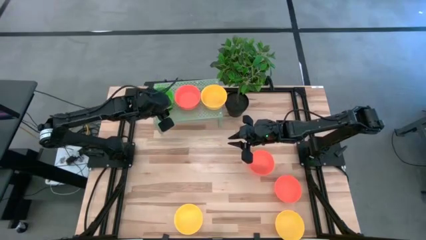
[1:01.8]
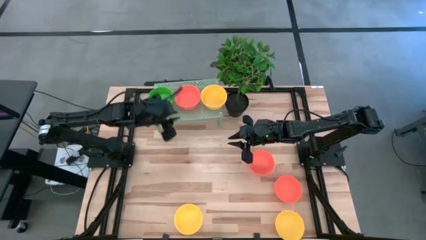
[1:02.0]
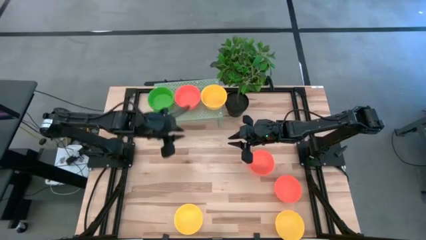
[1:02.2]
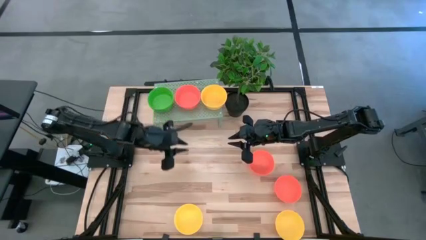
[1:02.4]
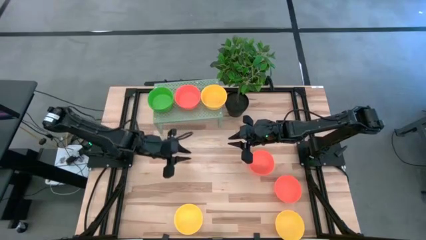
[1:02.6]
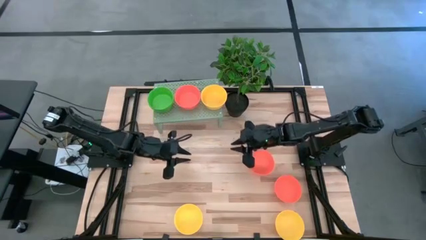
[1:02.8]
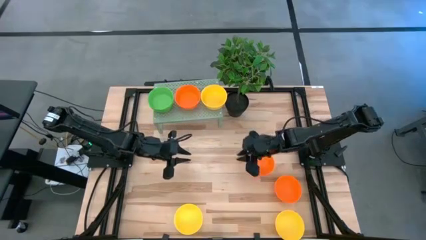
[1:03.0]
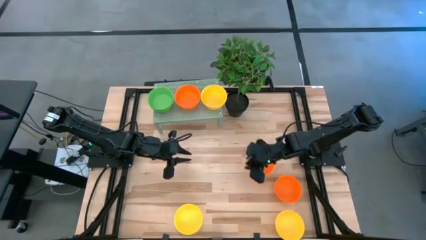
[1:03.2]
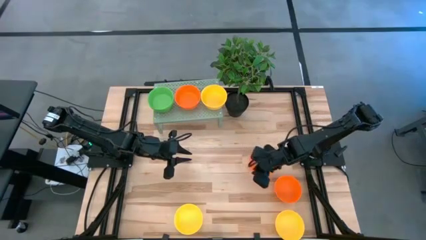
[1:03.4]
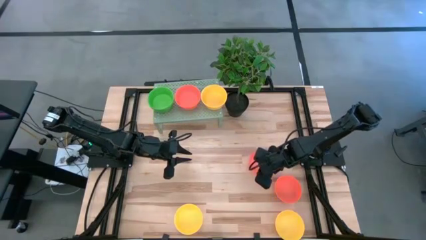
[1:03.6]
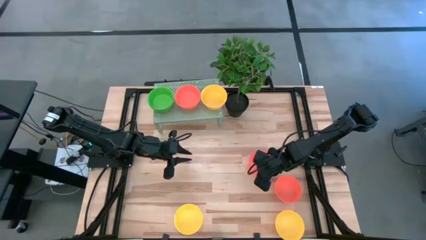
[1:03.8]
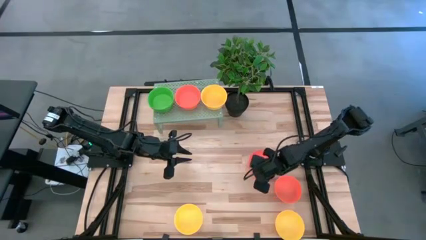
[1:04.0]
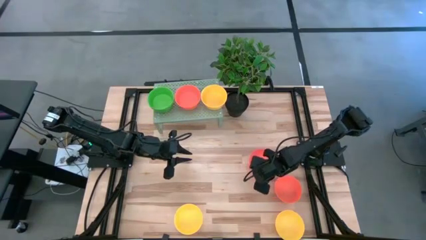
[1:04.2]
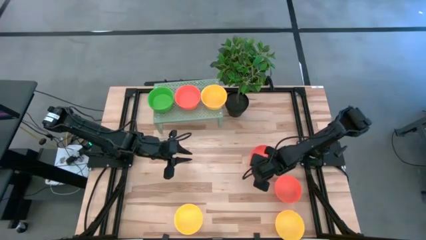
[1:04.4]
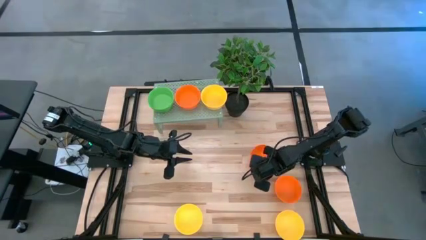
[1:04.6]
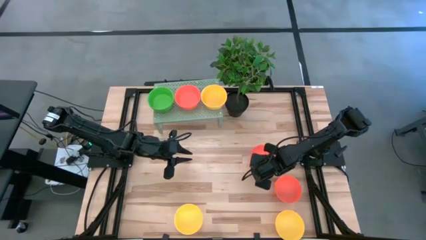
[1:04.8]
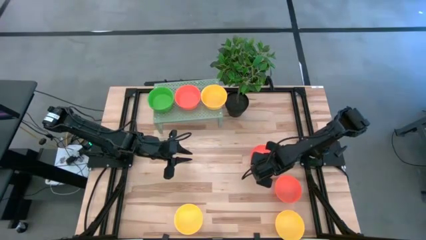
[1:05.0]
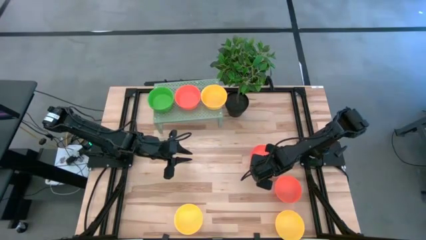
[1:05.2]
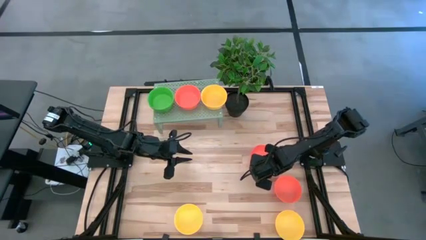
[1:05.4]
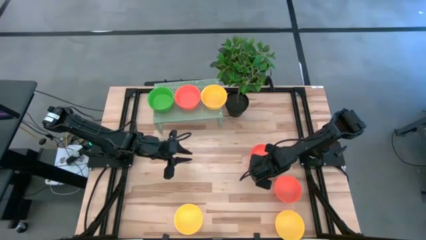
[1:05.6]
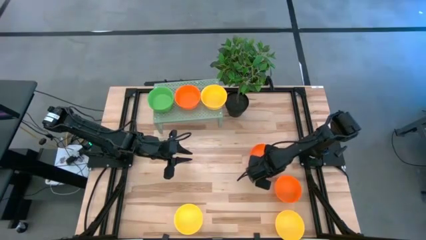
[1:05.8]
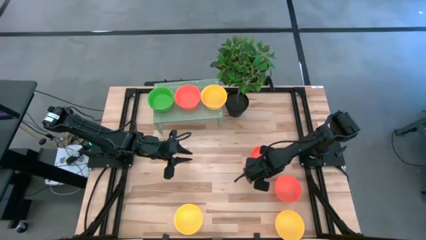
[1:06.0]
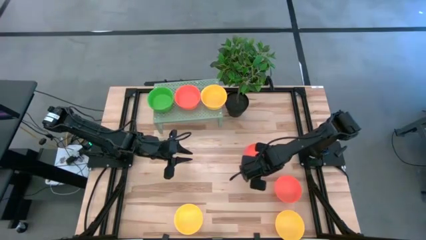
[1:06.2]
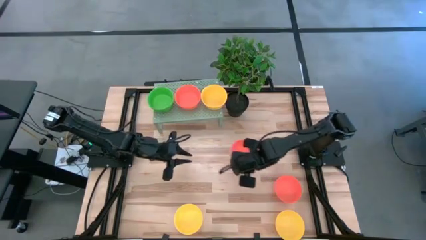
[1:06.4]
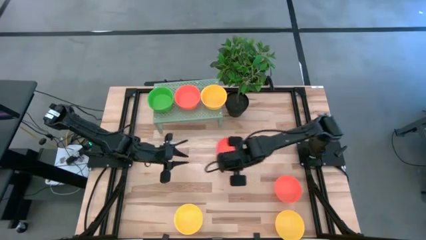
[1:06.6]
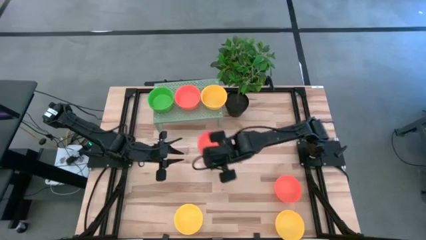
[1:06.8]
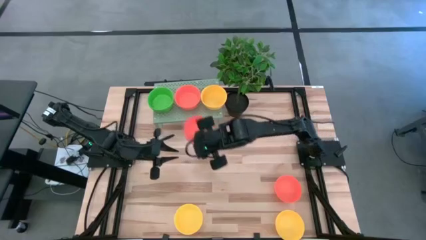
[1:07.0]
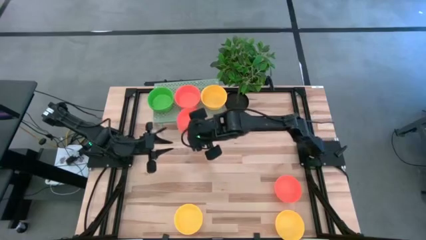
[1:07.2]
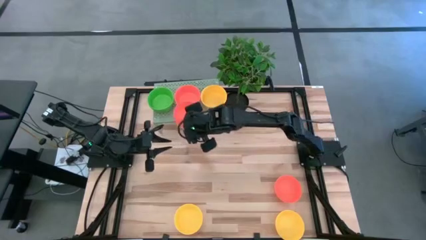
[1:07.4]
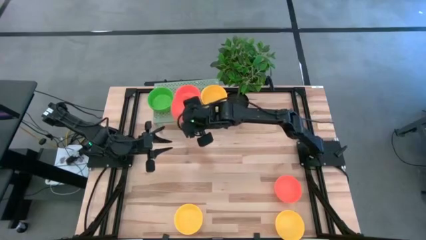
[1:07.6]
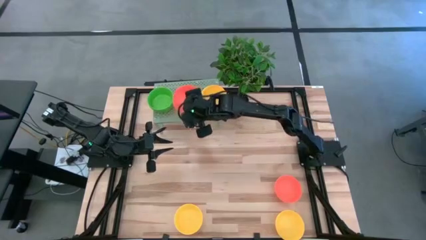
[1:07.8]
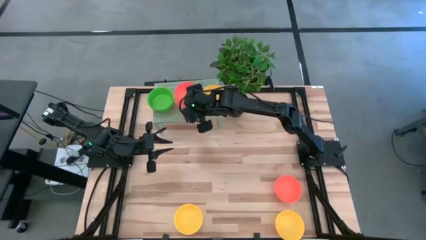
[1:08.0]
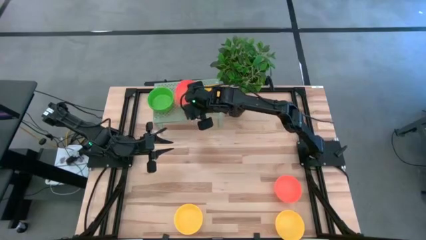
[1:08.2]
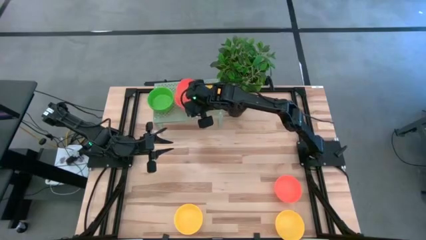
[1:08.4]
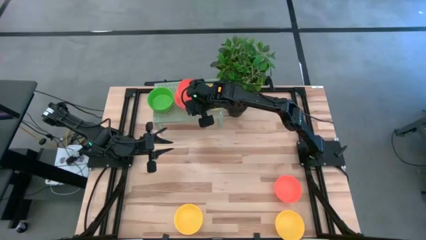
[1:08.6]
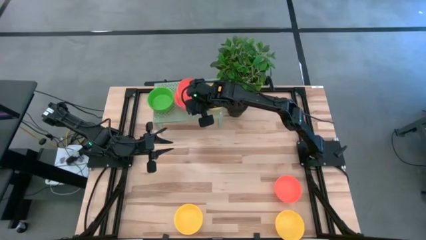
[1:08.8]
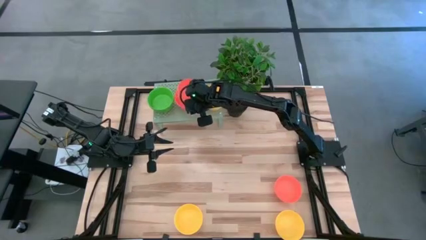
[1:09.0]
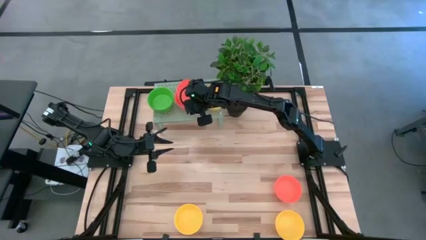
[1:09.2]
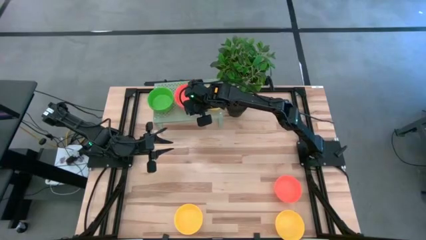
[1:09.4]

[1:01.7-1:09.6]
Task: Pick & Place Mini bowls
Stack the orange bowl on the orange bowls on the shelf

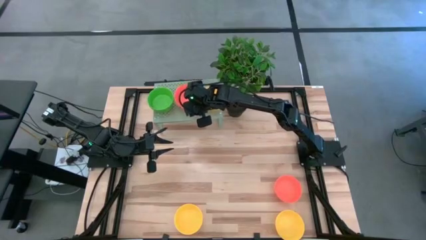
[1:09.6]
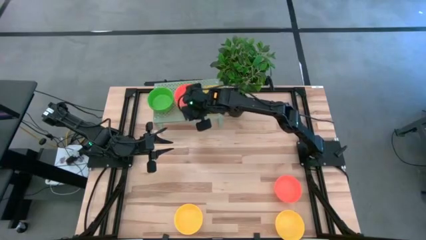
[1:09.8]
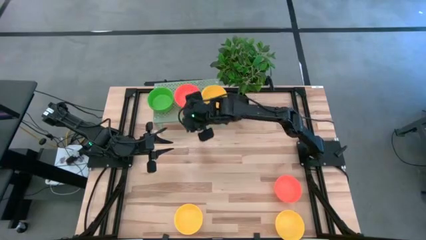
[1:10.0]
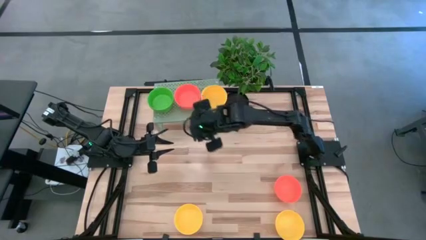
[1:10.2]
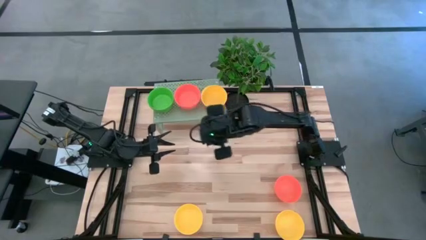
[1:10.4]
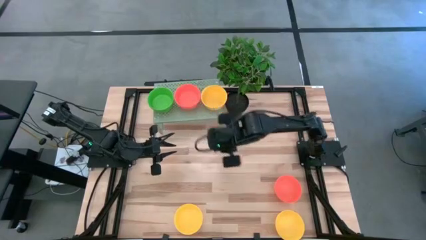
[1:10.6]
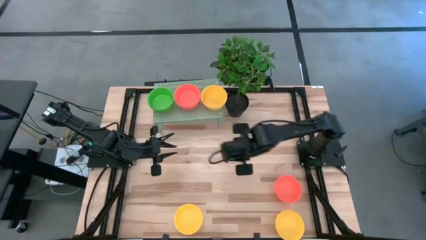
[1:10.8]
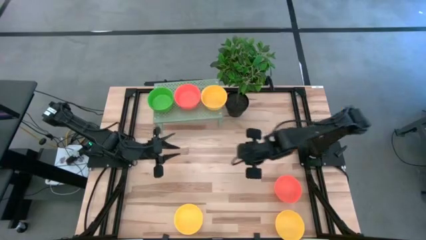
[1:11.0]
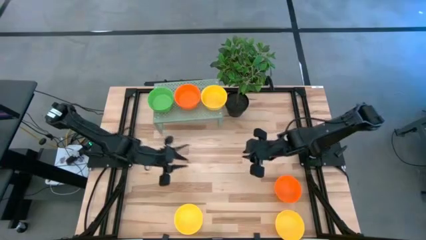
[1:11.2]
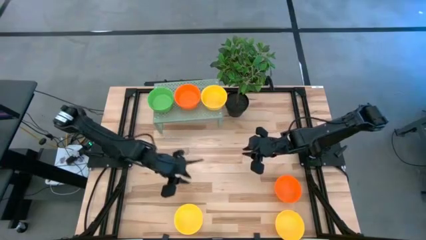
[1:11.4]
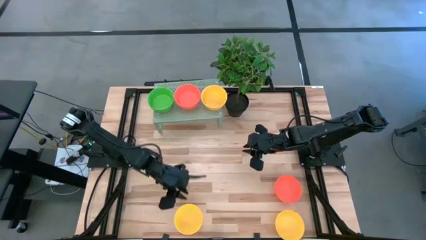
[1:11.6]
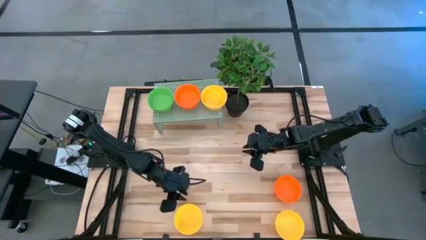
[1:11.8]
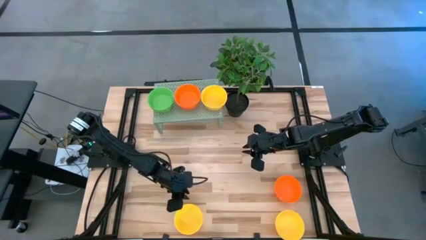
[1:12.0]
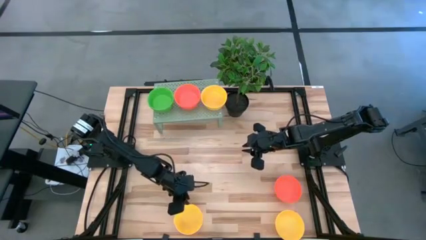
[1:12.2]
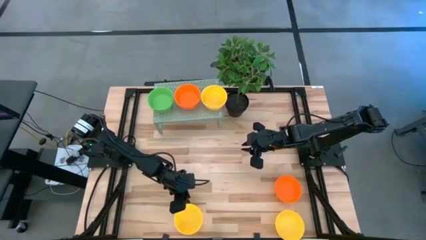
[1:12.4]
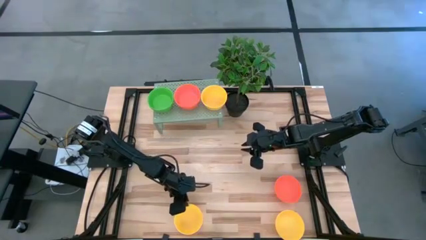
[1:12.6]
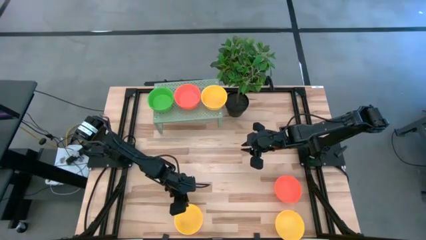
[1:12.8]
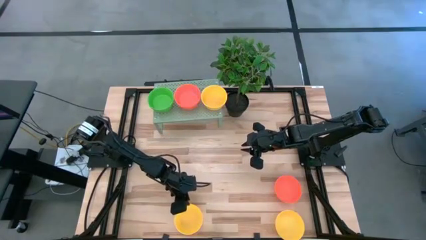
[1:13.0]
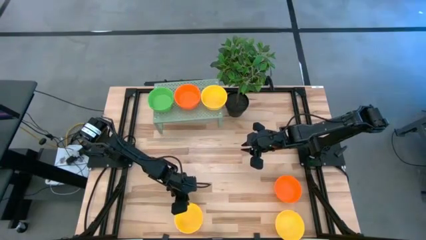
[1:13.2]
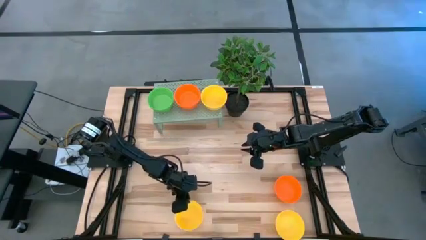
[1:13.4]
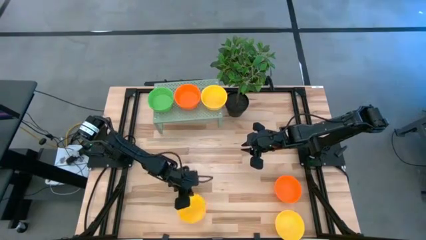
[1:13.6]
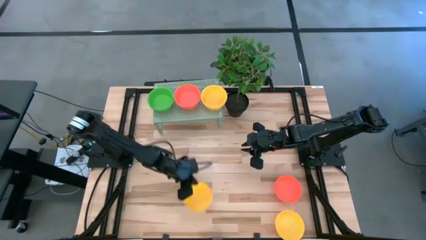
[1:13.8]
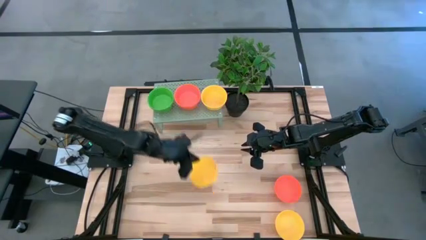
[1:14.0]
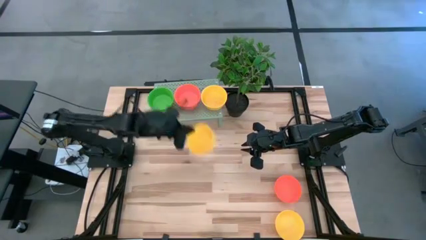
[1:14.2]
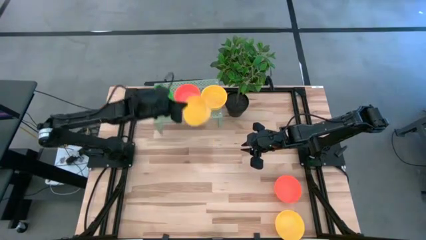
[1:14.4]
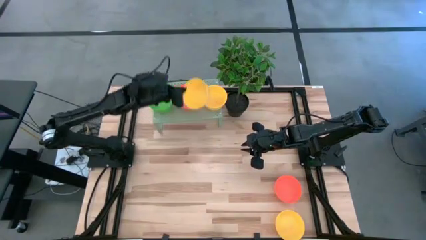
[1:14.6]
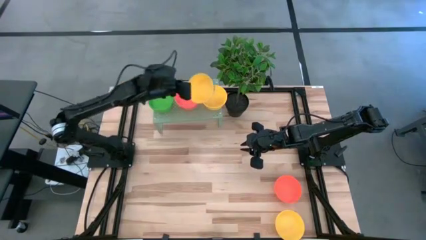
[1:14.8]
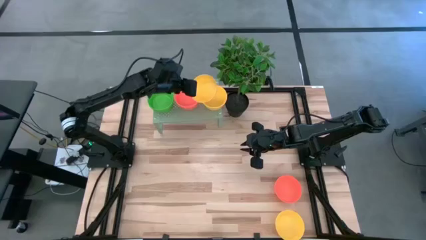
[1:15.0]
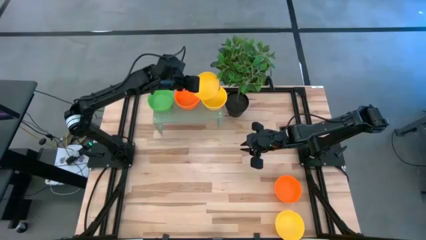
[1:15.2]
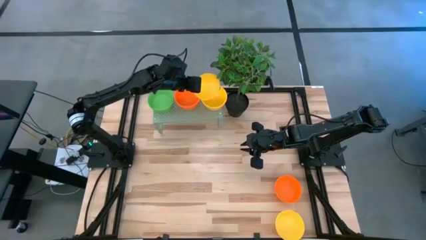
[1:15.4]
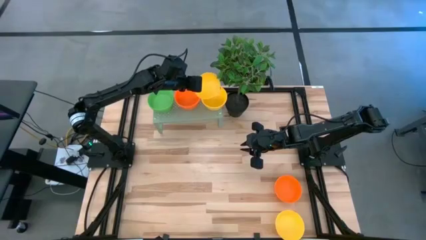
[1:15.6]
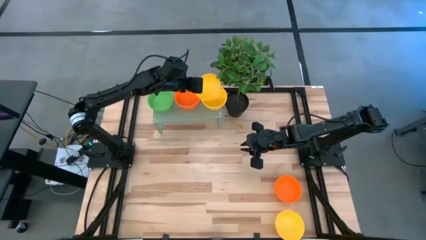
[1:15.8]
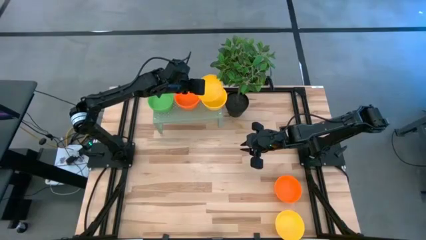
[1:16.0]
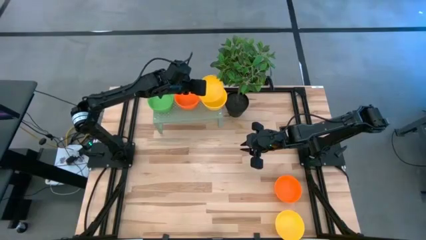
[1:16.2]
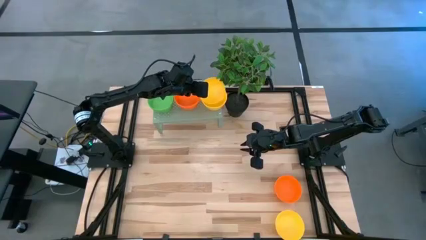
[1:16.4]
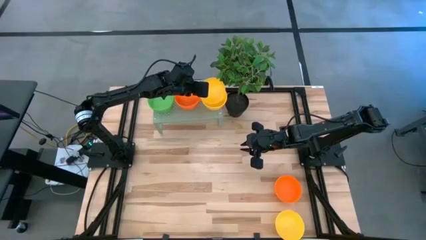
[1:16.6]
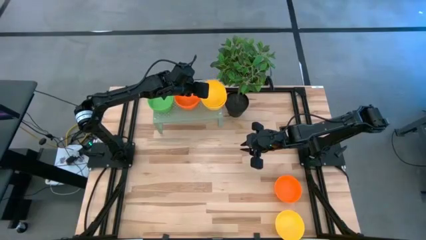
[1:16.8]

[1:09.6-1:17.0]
Stack the yellow bowl on the yellow bowls on the shelf

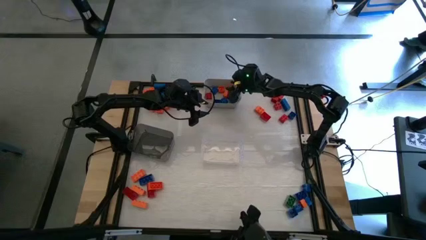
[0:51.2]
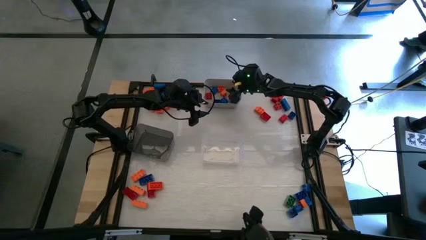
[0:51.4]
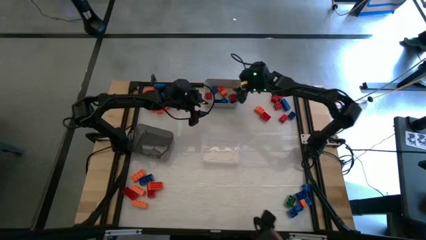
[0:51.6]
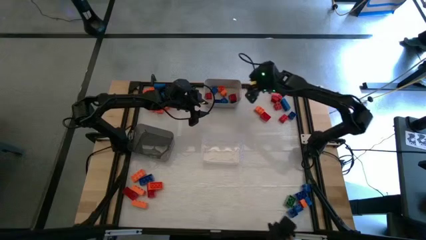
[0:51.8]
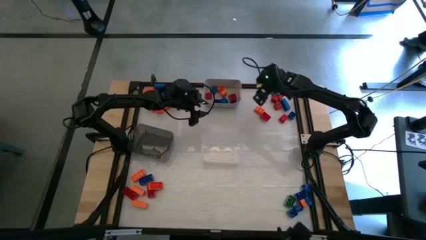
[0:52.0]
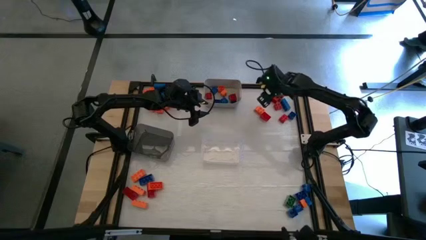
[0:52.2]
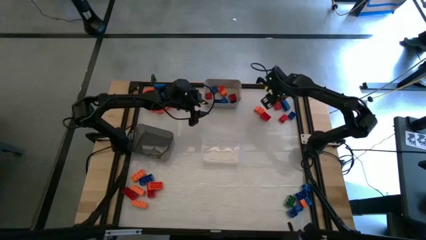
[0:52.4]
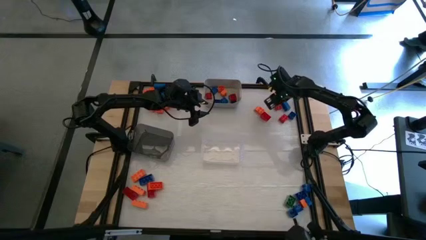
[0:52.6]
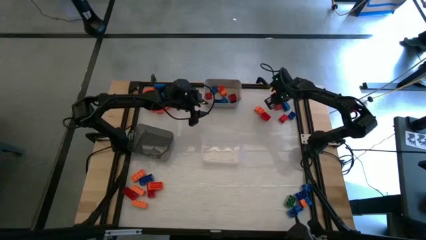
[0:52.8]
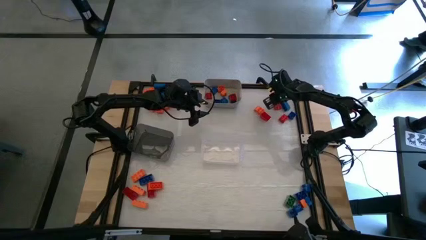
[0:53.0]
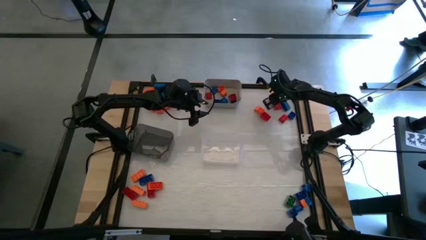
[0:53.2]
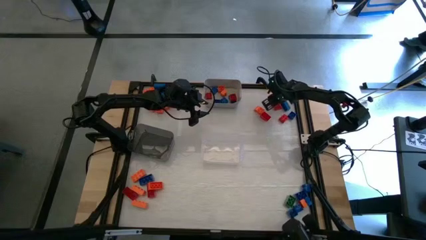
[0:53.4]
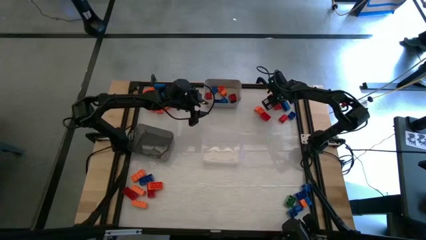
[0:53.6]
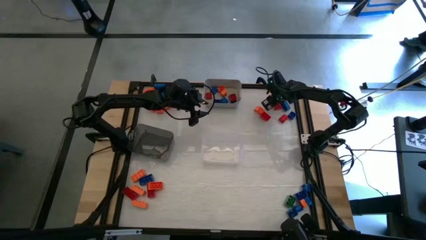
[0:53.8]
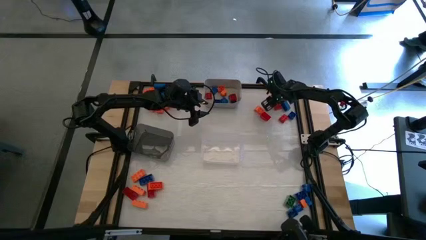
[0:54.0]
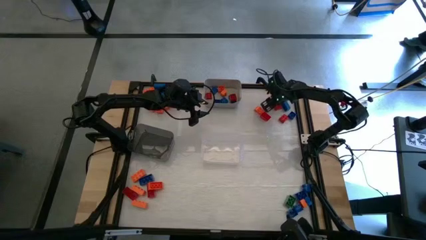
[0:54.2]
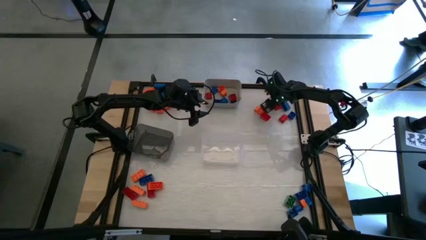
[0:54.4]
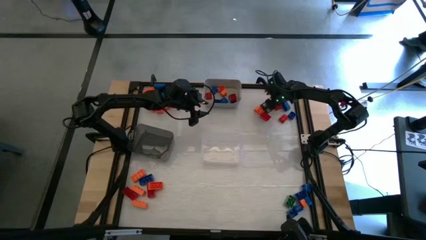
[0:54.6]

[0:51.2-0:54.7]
Task: Sort blocks by size
Put the small red game piece into the gray bin
